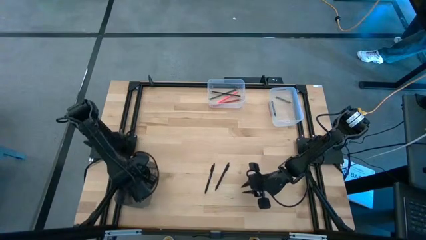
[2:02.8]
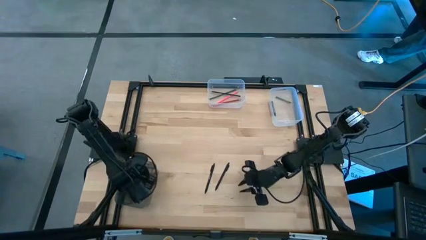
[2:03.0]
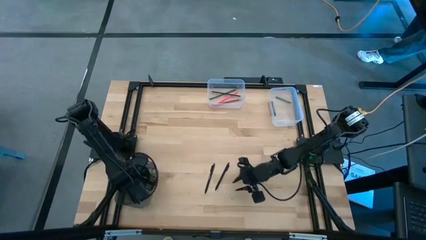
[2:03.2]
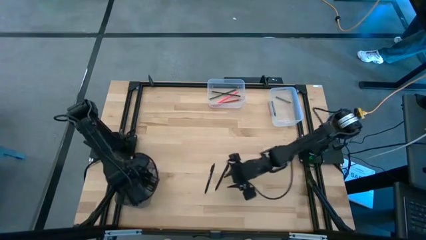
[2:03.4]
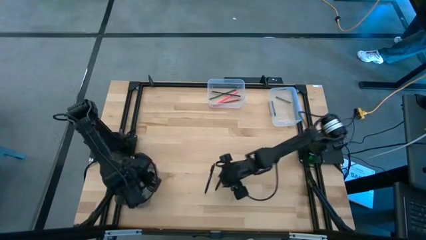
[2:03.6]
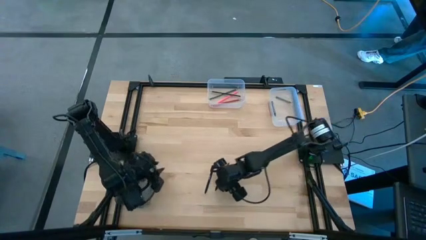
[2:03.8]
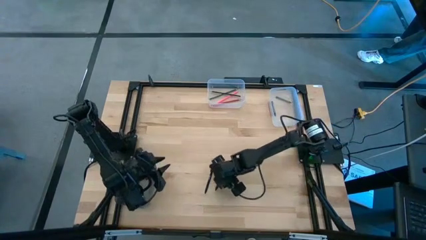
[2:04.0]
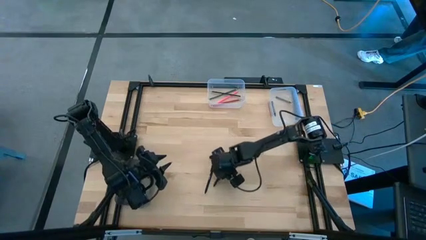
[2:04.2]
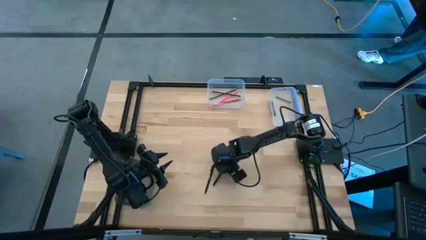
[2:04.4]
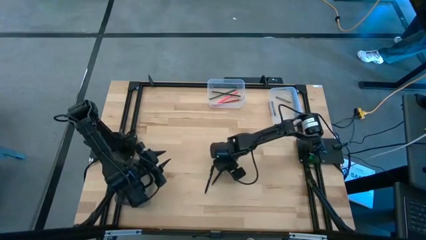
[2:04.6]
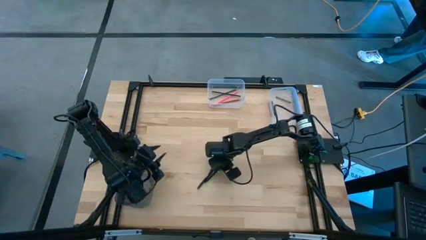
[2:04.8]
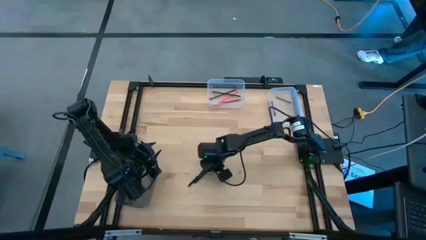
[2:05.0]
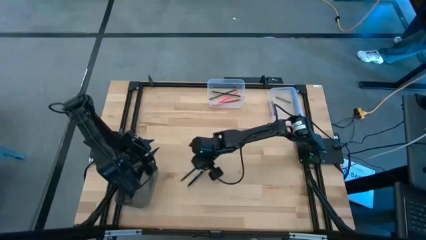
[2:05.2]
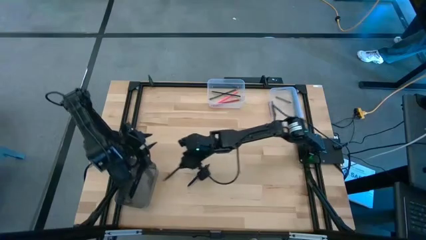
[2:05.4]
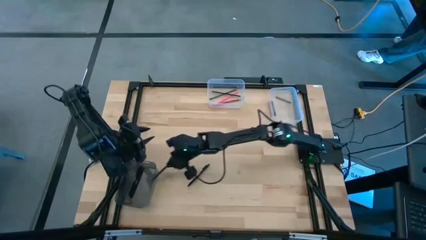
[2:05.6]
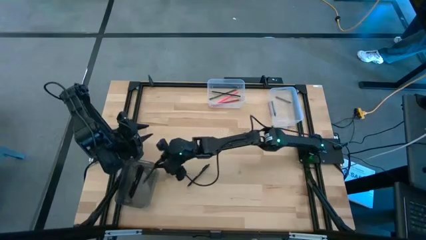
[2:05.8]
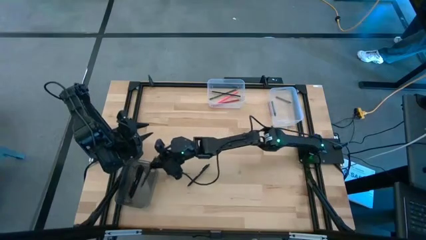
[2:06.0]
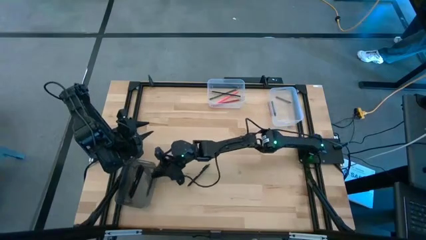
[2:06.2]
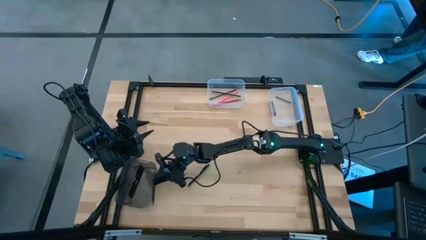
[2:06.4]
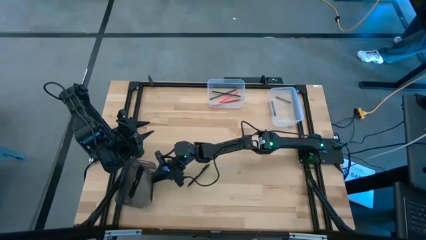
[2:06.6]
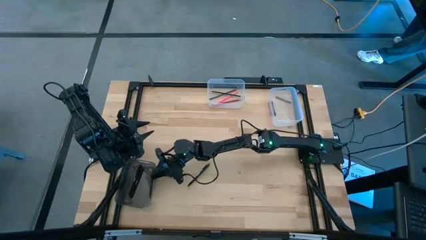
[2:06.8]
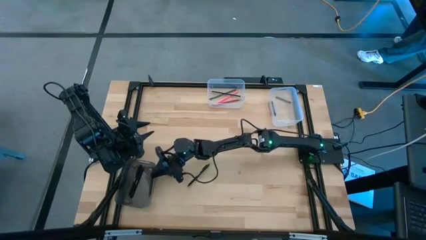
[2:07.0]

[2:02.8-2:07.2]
Task: Sort crayons/erasers/pens/pencils in bins
Put the right black pen into the black bin

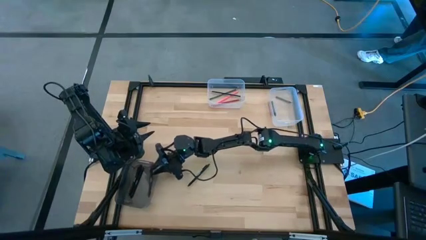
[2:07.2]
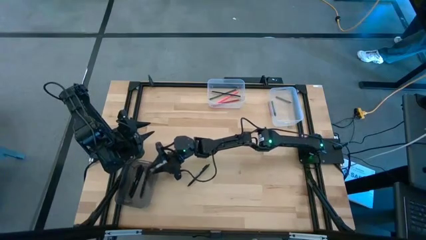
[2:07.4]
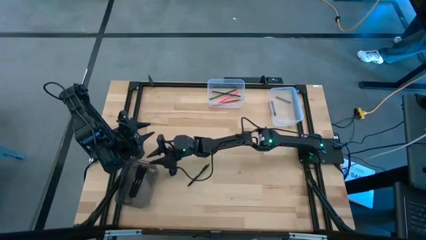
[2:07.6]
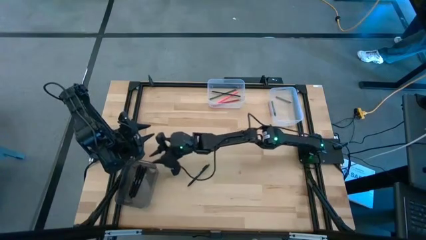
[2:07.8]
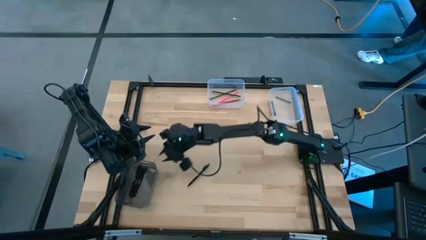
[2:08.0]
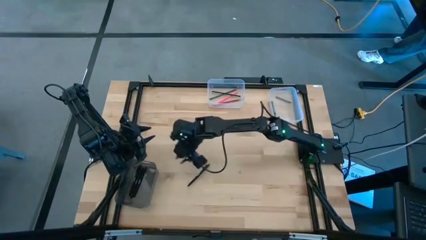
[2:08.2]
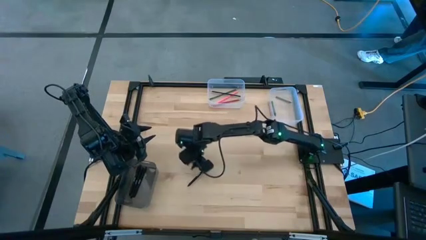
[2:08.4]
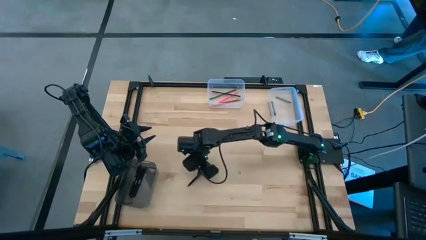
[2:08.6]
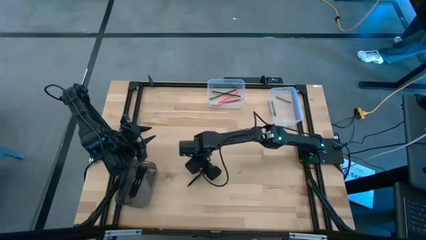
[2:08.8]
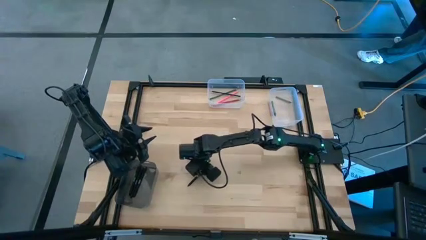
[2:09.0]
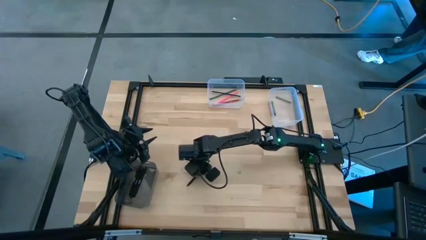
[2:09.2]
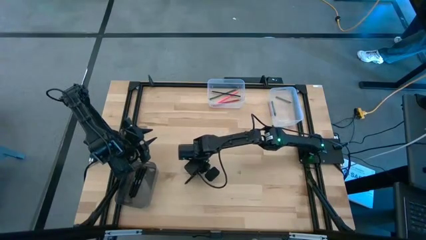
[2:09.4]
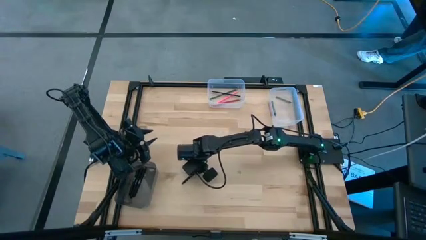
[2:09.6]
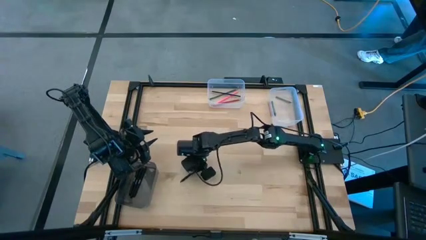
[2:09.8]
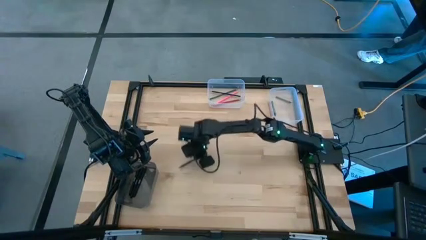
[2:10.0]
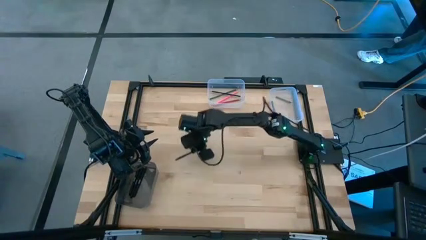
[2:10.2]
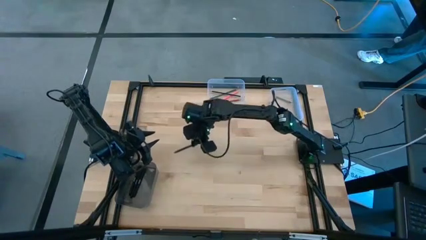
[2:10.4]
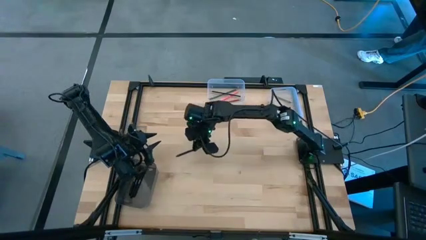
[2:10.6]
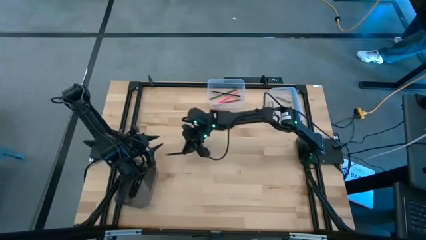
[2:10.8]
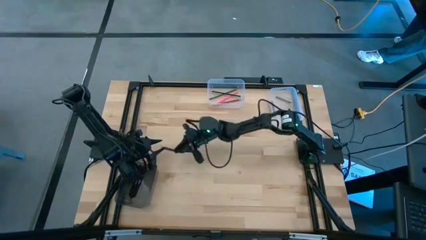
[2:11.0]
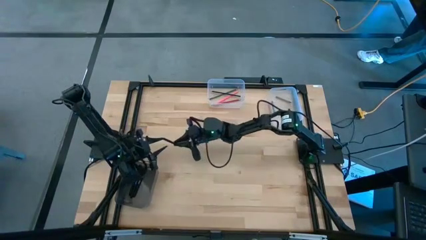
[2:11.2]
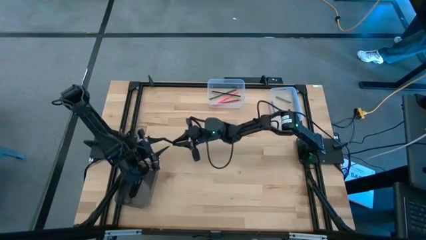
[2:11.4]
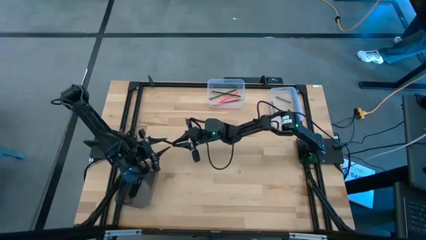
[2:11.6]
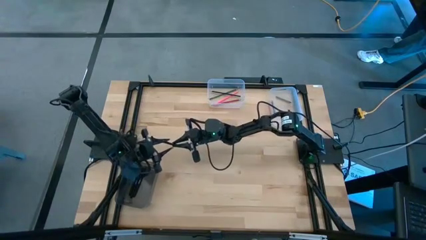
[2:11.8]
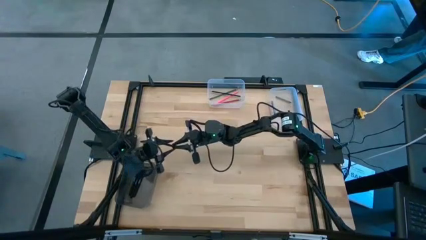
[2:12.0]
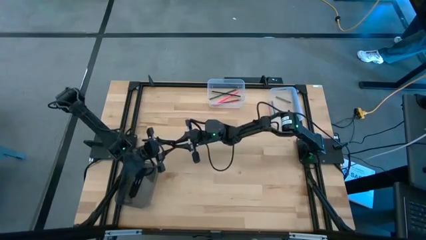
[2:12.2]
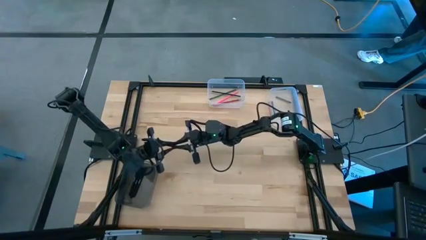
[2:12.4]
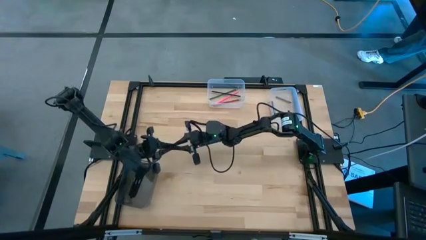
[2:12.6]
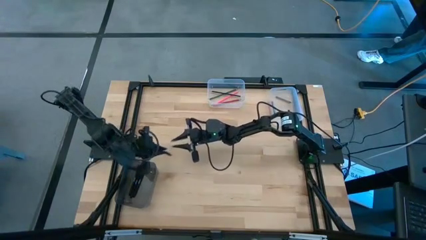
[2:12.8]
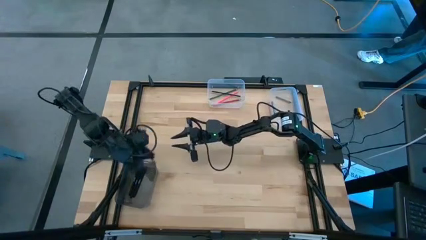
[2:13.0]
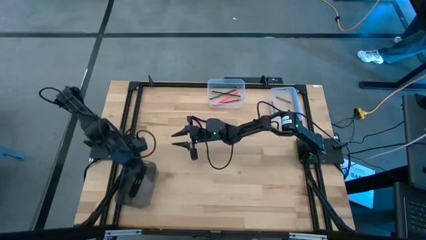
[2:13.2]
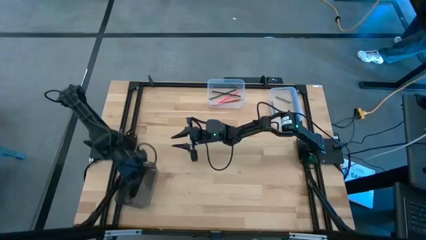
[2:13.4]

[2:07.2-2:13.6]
Put the black pen into the black bin

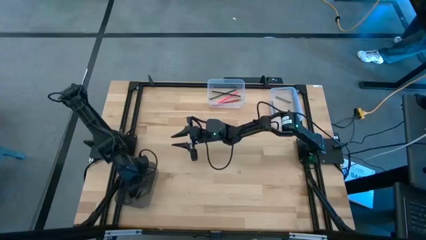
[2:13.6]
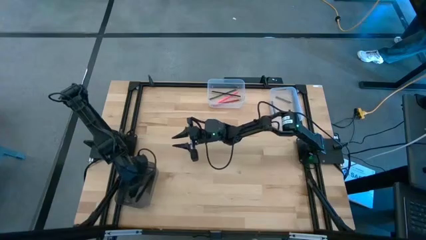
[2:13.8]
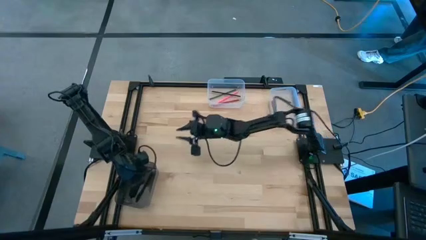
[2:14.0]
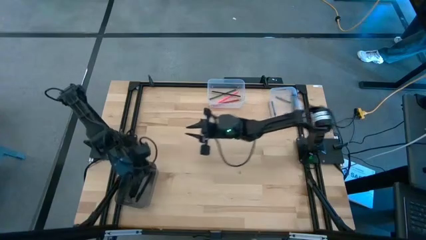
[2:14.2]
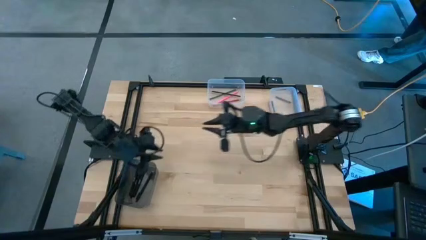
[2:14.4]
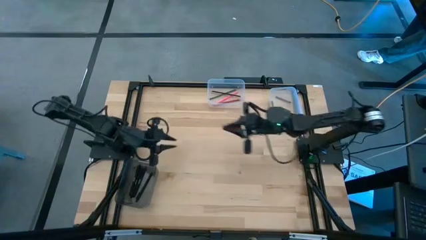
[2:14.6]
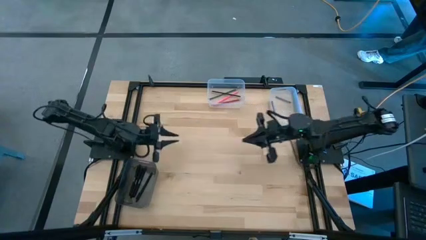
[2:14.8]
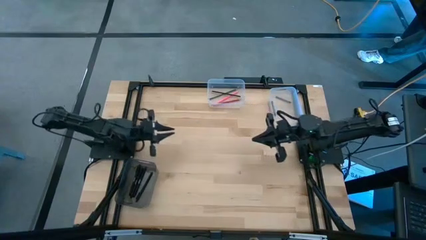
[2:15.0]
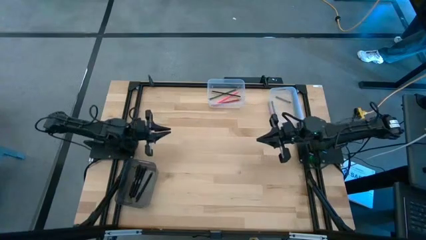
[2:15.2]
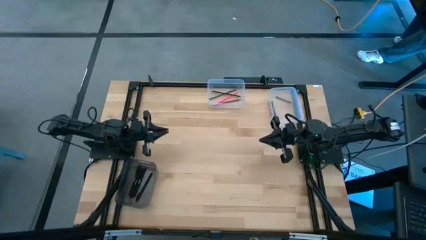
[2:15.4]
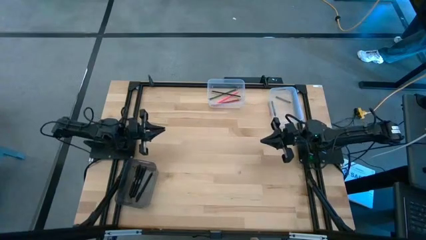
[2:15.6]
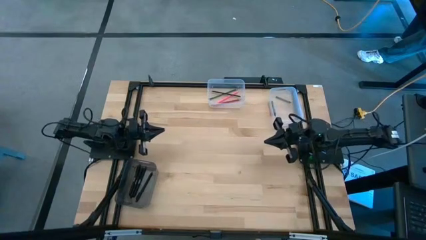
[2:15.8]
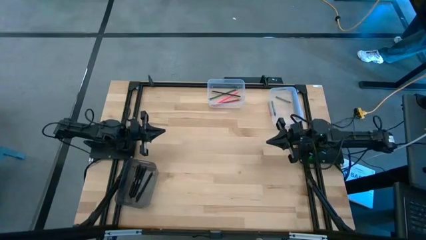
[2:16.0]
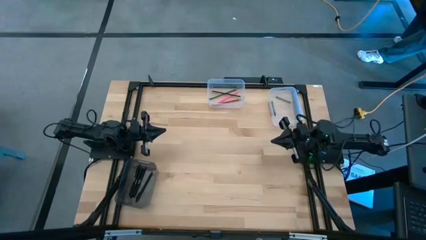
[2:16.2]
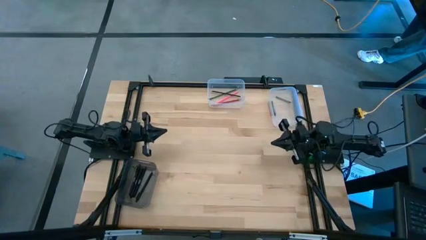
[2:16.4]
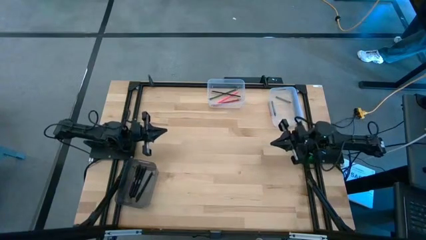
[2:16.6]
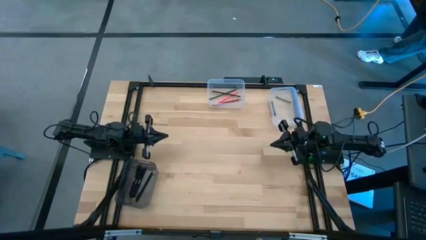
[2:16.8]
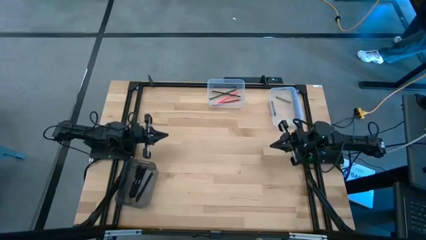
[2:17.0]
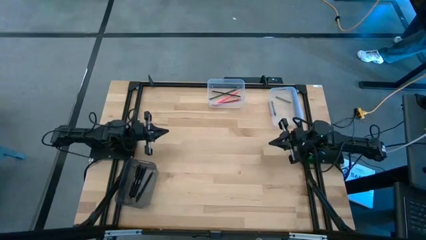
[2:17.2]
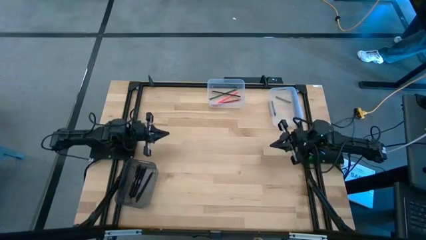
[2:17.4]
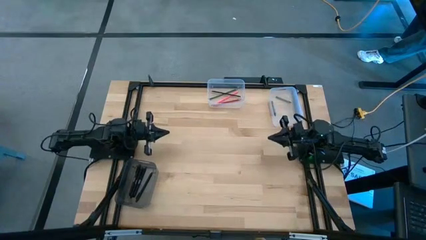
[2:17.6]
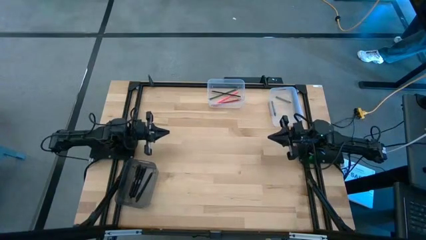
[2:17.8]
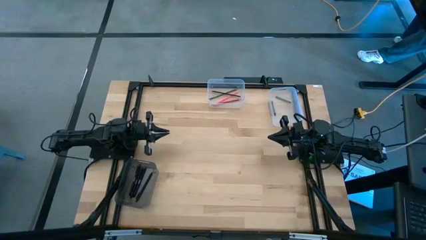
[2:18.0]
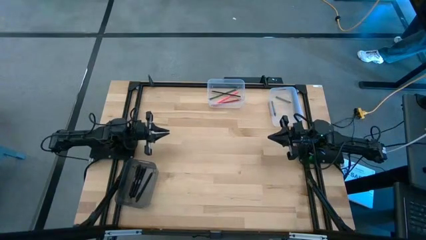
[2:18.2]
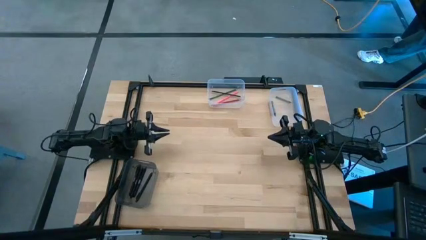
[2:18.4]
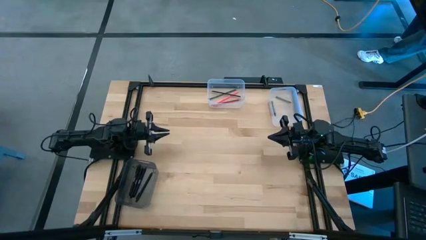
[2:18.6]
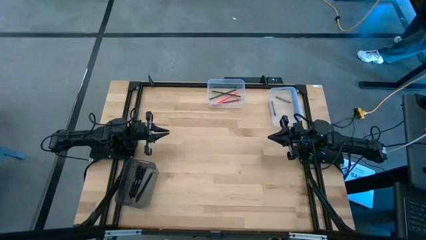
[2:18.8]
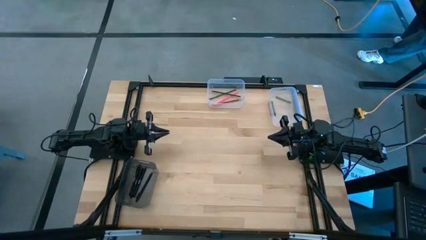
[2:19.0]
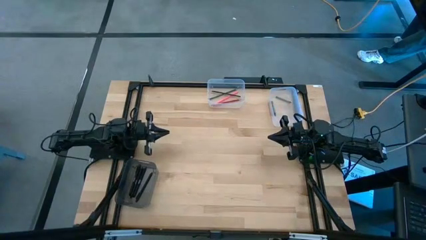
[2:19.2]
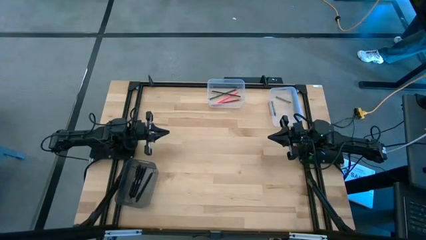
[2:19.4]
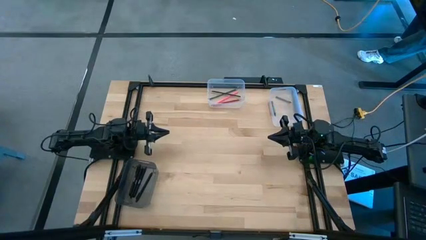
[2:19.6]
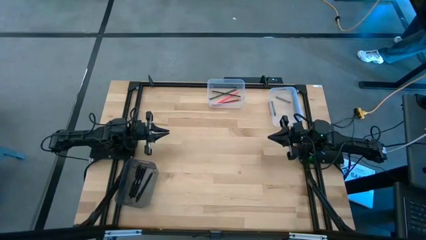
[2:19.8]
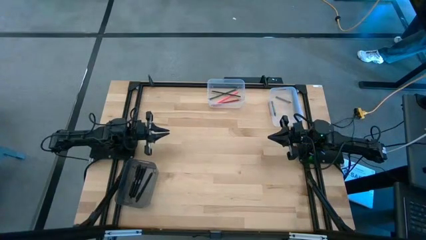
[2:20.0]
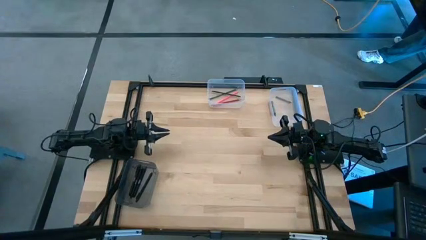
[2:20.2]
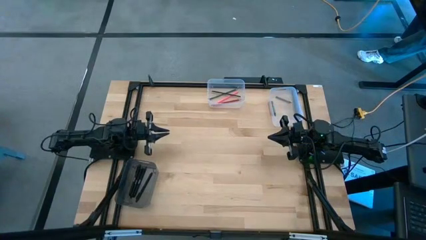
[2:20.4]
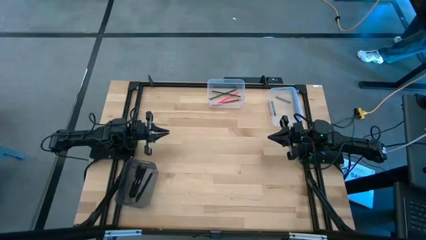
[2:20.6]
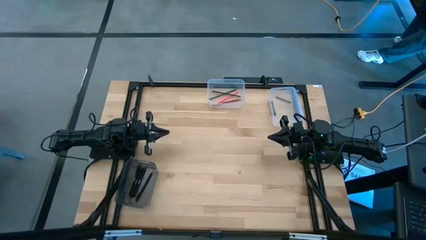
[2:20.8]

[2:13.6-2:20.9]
Return to Home Position
